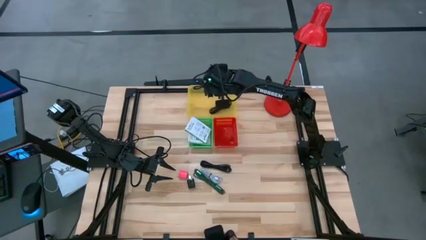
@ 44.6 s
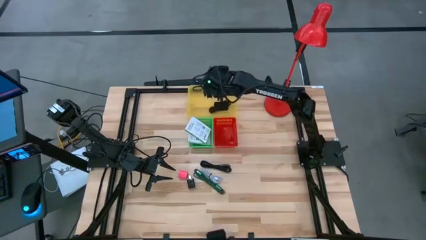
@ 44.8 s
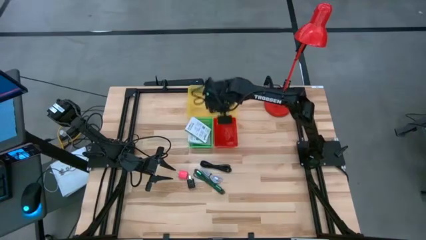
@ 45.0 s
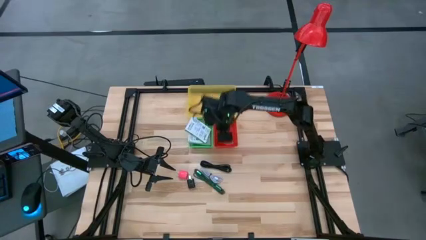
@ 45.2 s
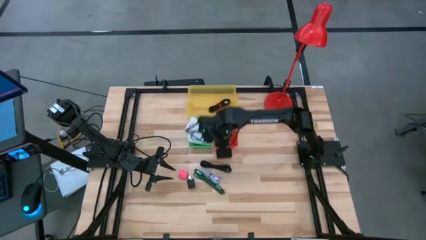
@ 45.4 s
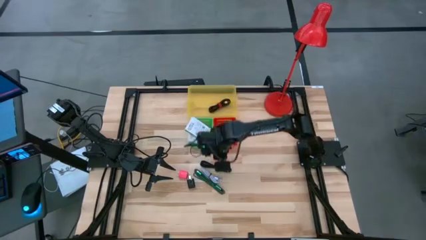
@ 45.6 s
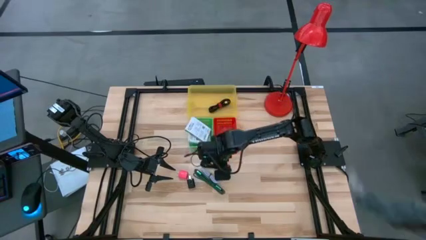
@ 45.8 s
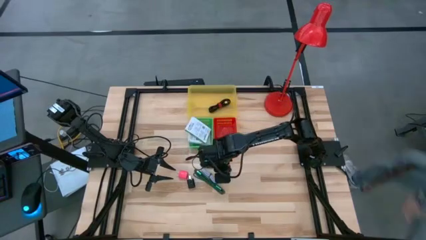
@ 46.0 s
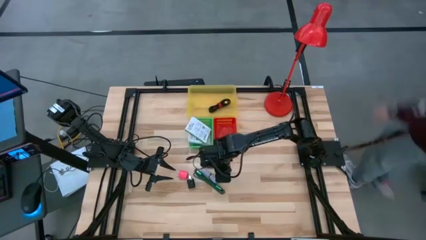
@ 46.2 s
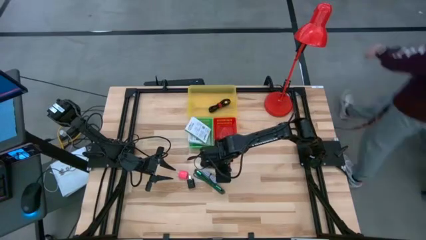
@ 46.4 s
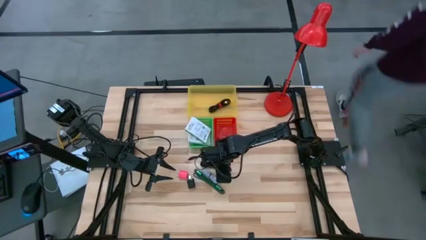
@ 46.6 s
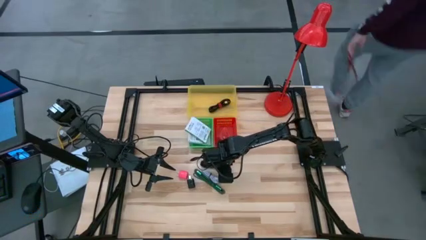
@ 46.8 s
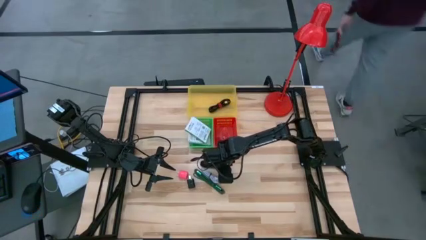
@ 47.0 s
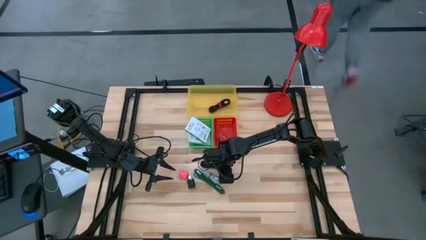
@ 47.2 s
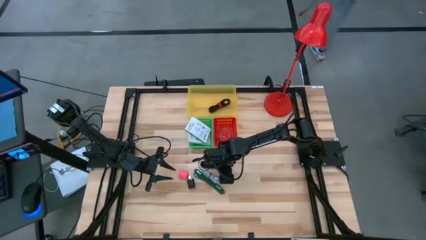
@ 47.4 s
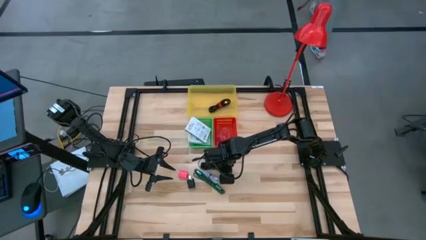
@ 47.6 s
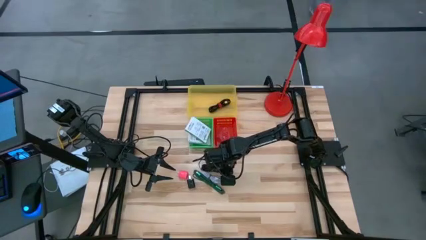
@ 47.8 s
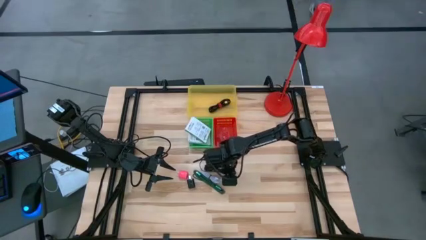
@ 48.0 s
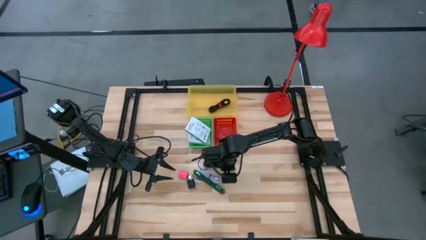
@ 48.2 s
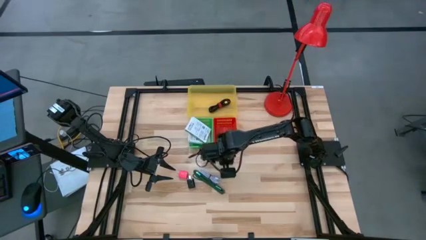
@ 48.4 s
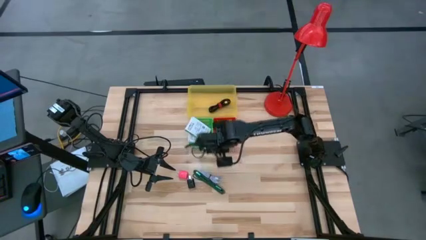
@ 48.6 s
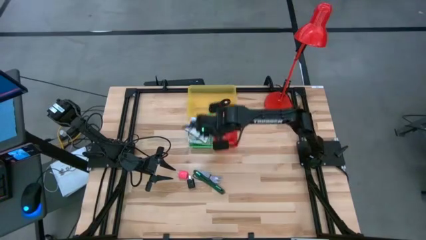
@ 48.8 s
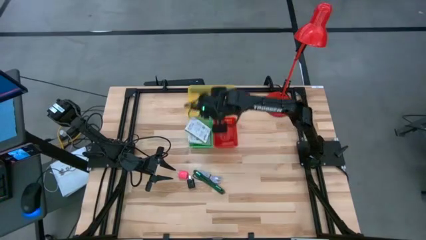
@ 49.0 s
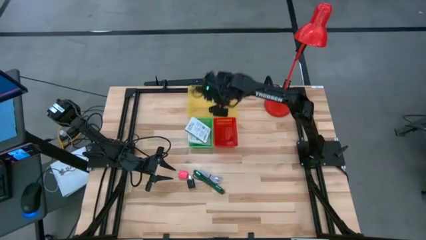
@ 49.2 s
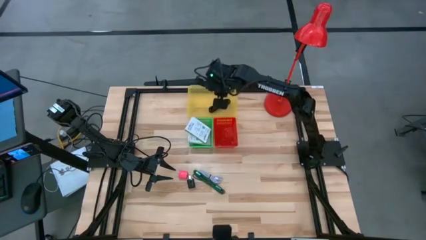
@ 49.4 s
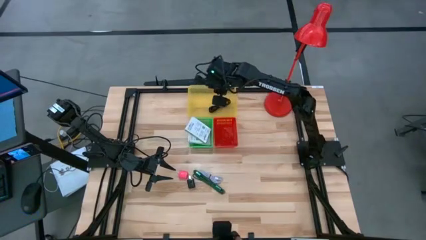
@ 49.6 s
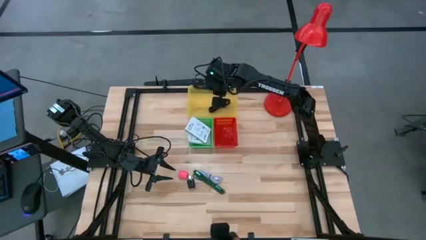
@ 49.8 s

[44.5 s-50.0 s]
Task: Pick and place items into bin
Put the black charger cable into the yellow bin

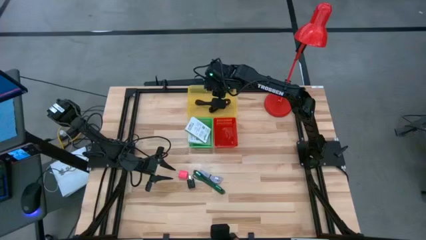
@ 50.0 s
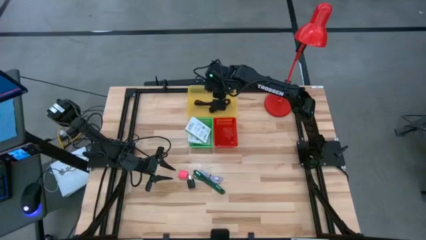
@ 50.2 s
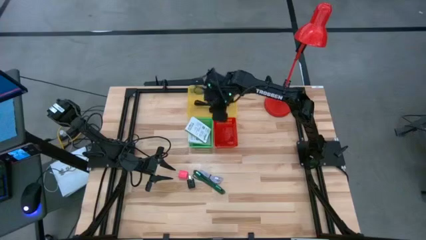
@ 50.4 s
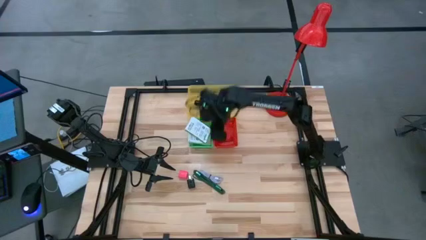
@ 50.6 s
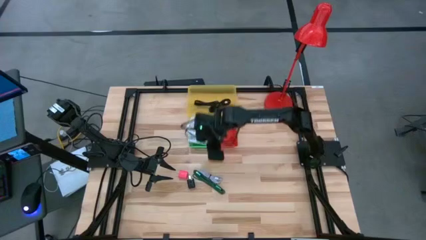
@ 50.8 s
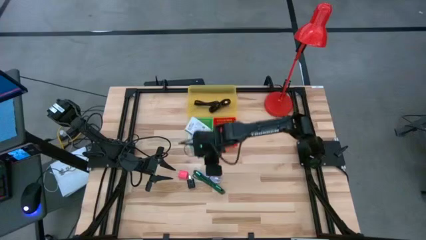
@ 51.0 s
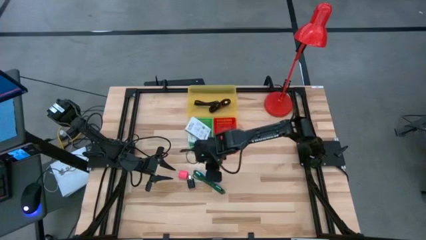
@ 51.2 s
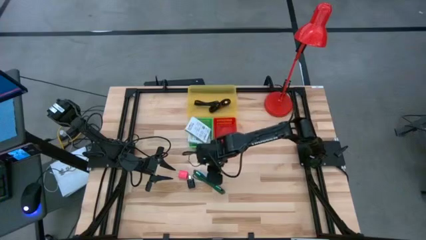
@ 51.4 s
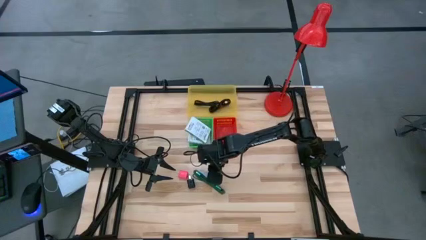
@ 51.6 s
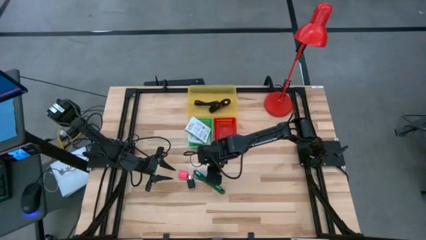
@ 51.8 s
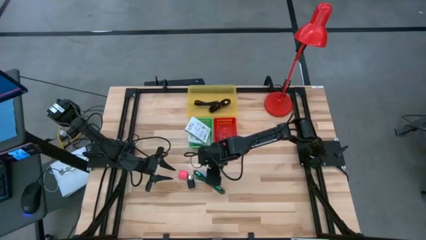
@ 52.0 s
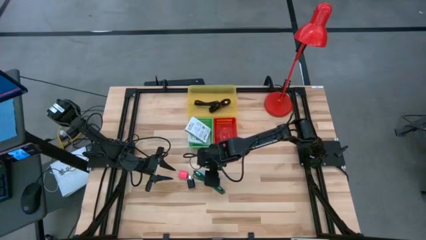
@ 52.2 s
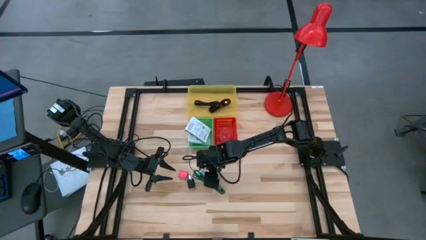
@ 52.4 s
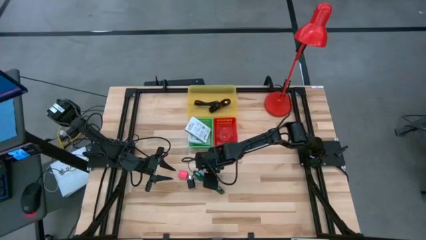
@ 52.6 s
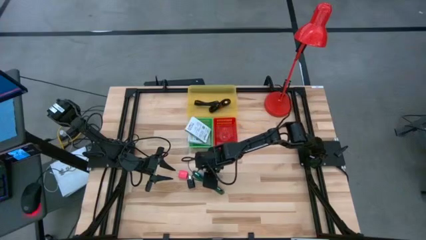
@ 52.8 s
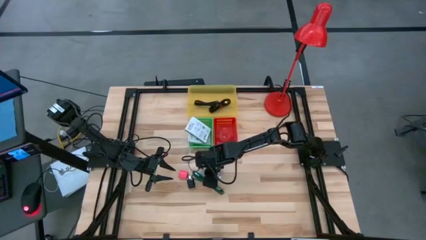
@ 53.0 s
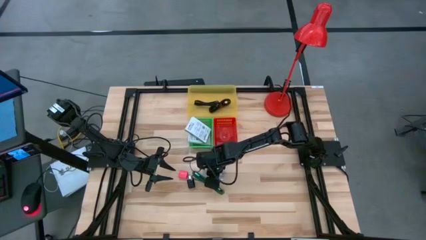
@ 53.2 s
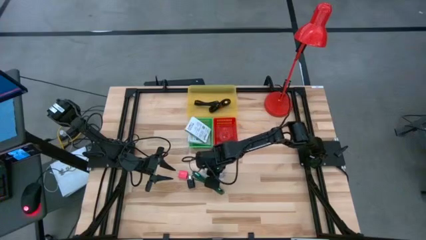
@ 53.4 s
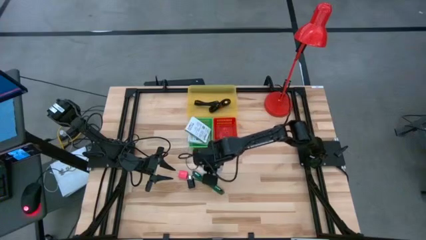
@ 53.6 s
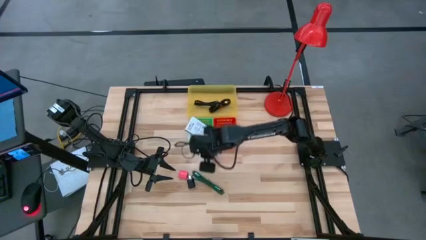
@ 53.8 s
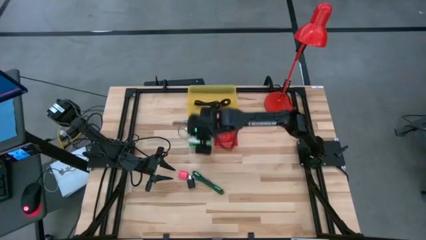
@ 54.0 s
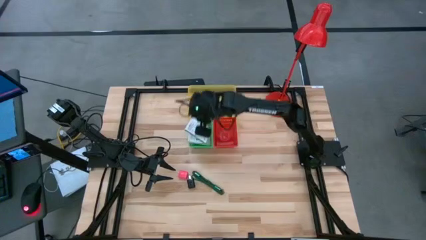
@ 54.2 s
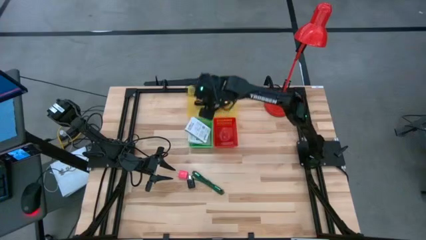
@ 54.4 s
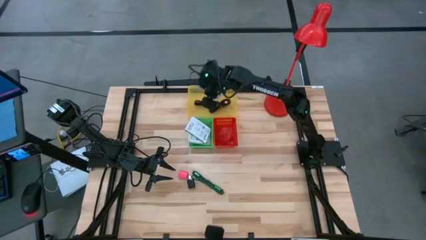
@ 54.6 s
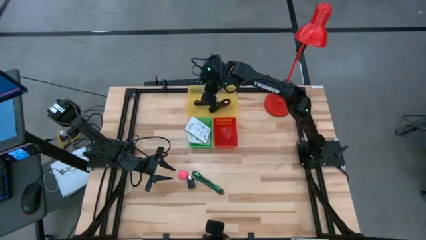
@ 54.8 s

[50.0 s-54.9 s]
Put the white charger cable into the yellow bin

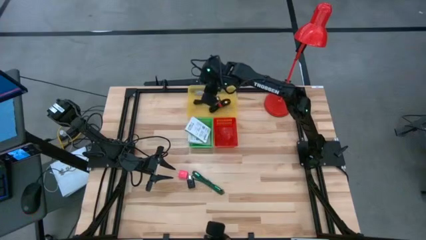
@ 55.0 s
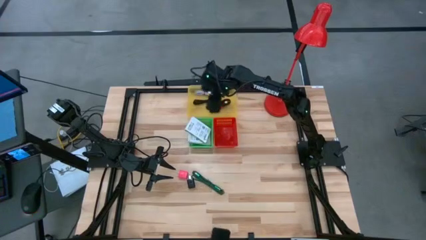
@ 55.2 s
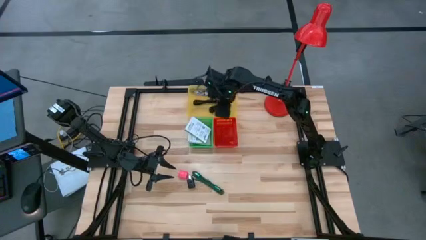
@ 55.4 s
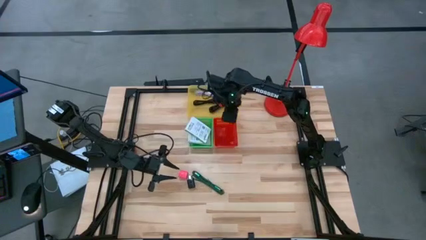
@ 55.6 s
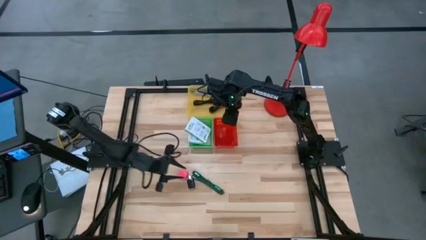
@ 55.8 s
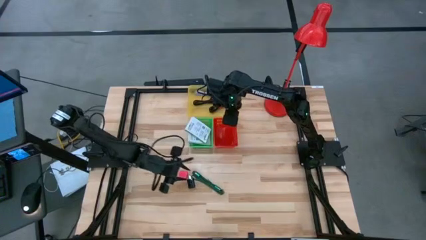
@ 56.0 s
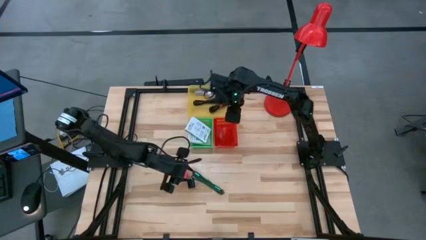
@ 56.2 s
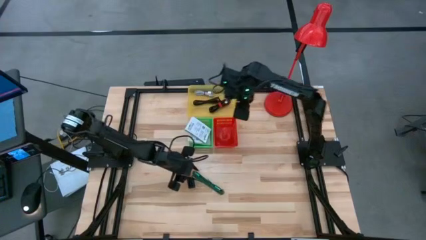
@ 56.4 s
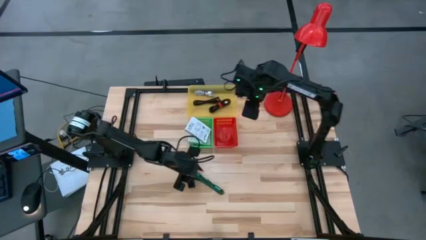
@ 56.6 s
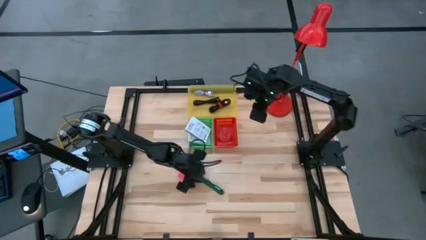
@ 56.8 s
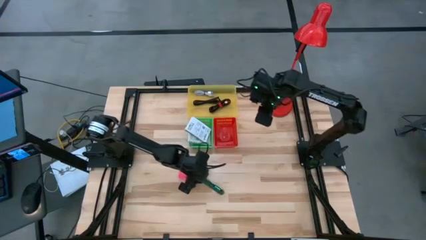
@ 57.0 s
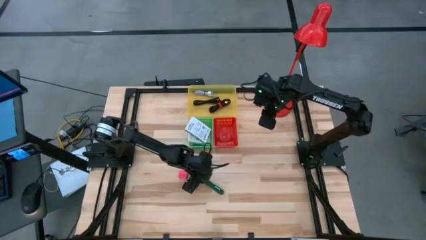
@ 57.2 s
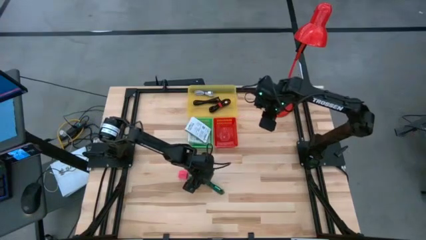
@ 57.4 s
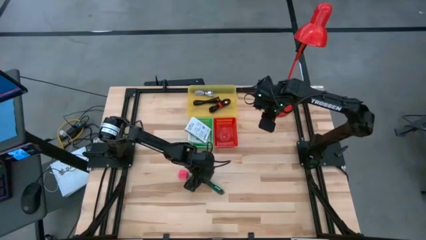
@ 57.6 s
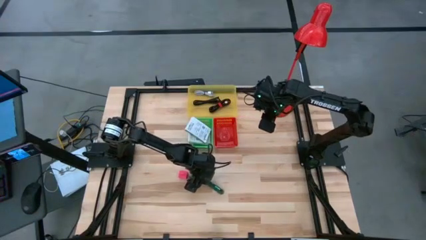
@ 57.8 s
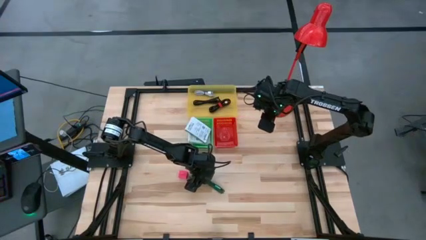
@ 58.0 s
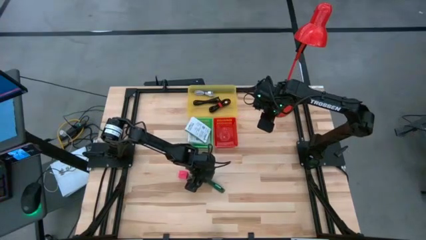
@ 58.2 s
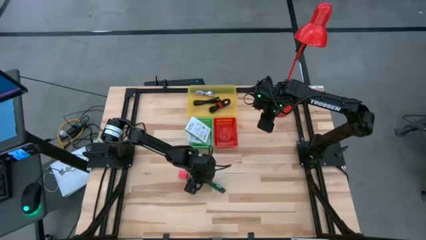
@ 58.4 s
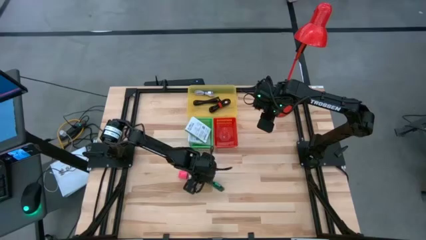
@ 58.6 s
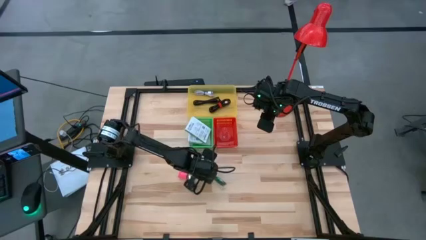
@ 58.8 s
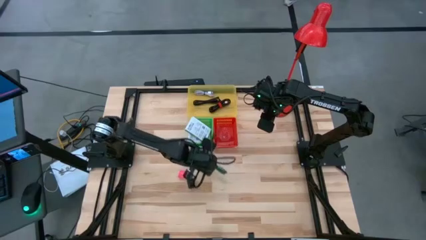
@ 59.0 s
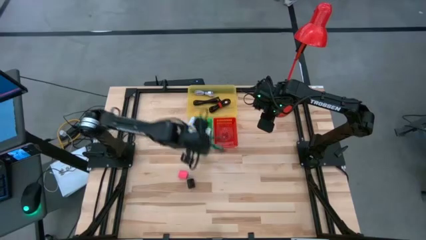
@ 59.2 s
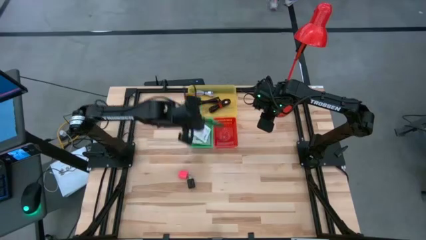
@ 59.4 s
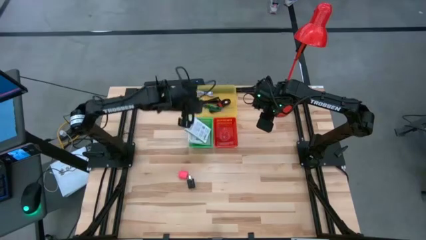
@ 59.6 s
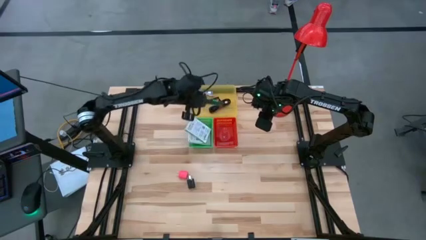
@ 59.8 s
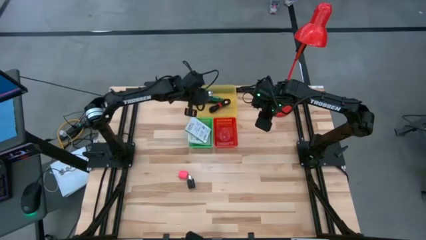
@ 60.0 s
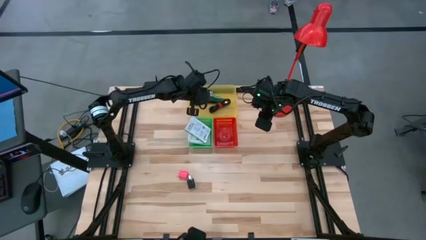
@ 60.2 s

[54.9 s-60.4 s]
Put the green charger cable into the yellow bin
